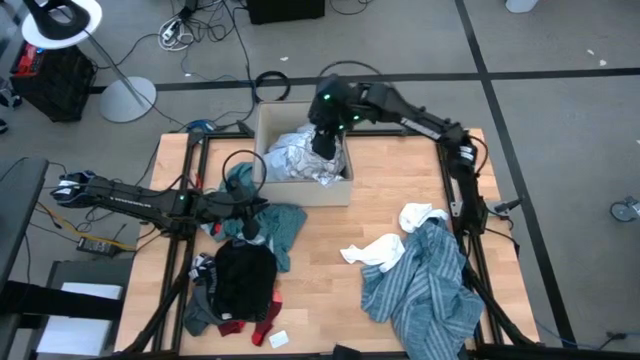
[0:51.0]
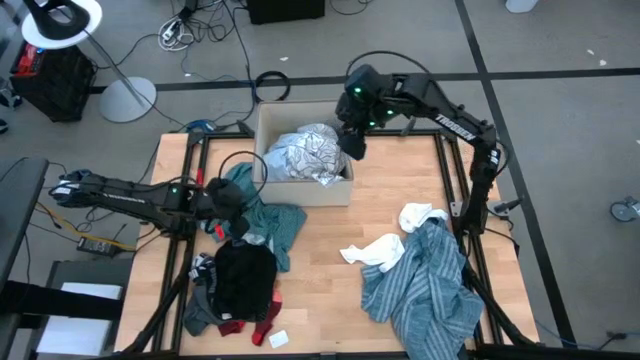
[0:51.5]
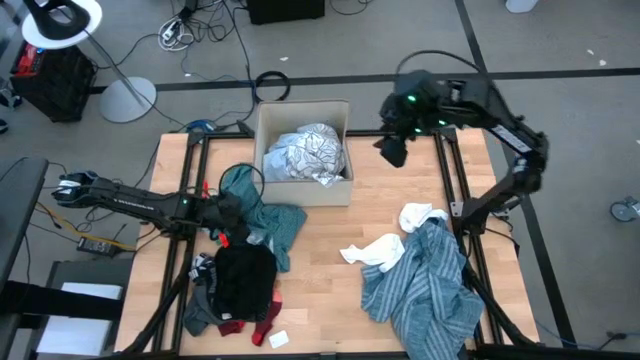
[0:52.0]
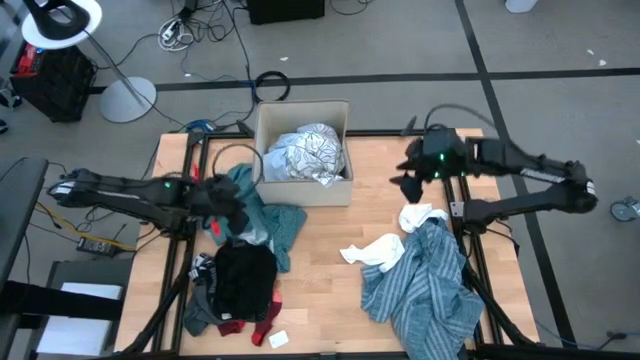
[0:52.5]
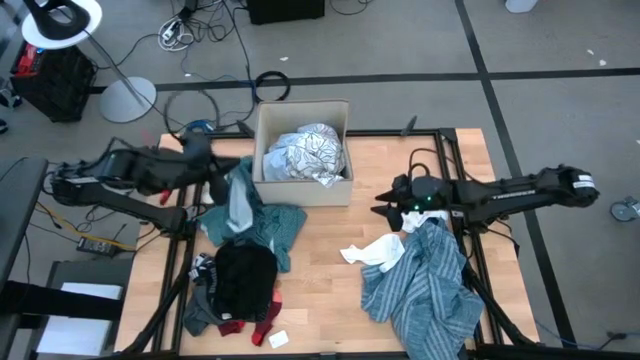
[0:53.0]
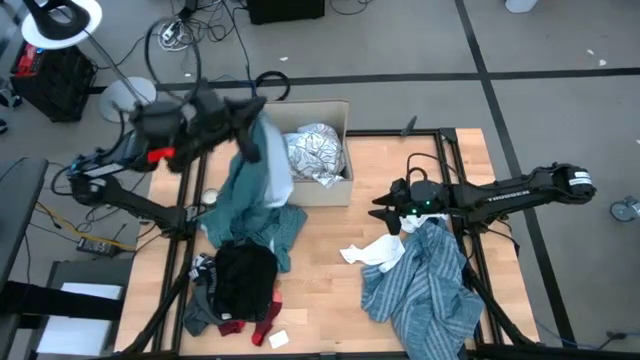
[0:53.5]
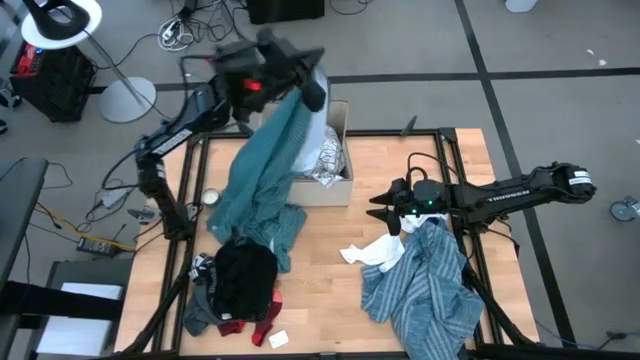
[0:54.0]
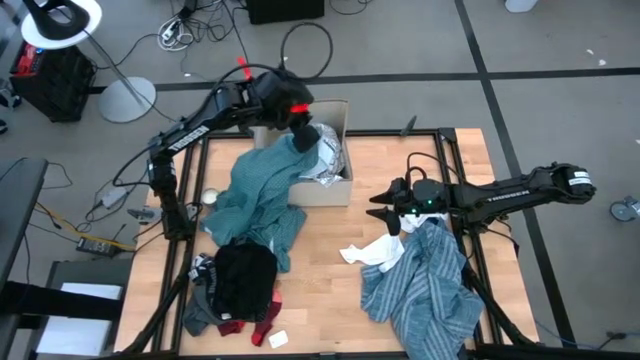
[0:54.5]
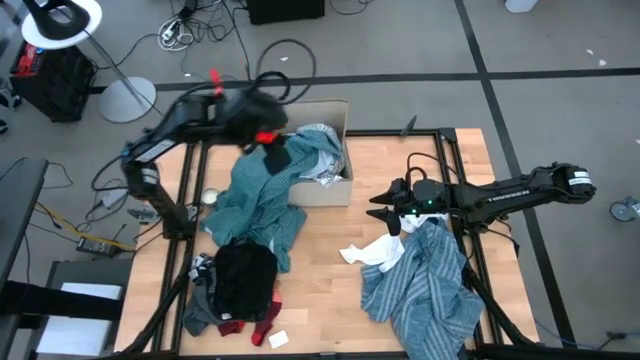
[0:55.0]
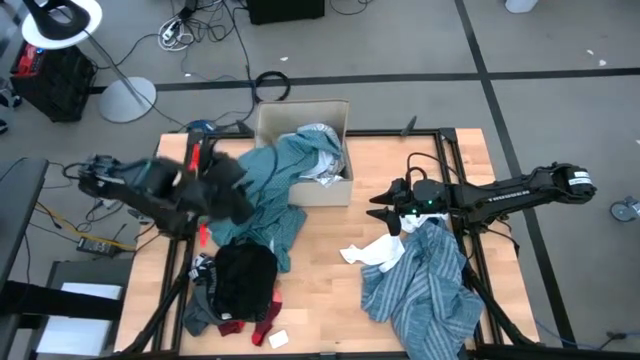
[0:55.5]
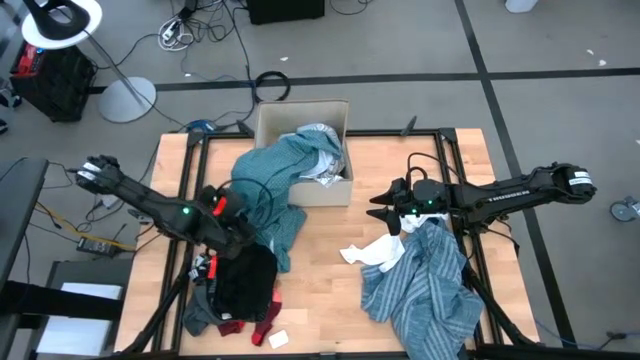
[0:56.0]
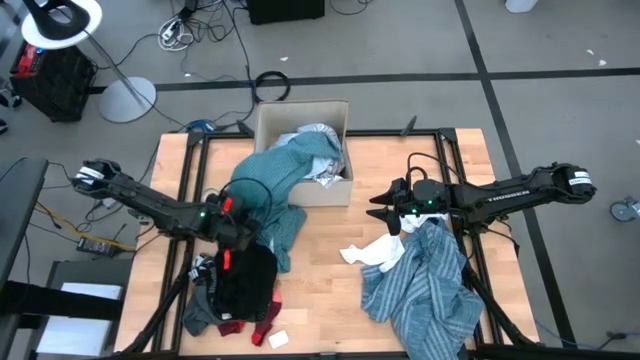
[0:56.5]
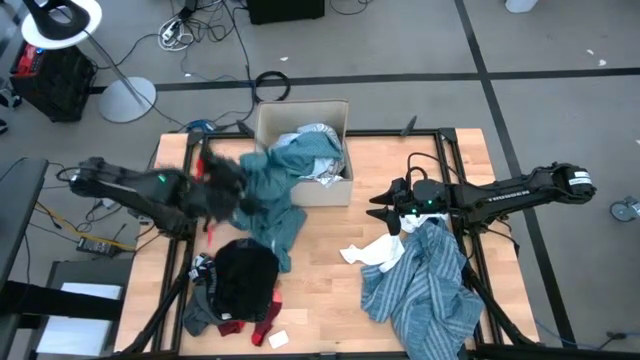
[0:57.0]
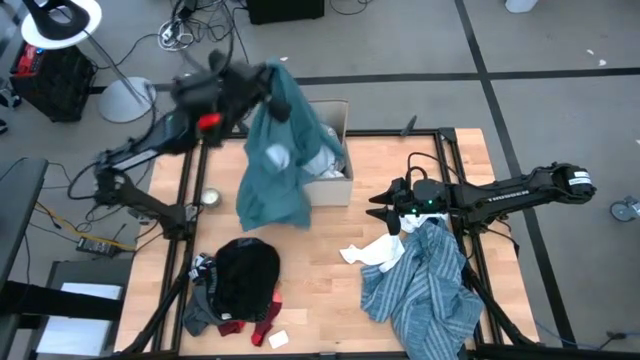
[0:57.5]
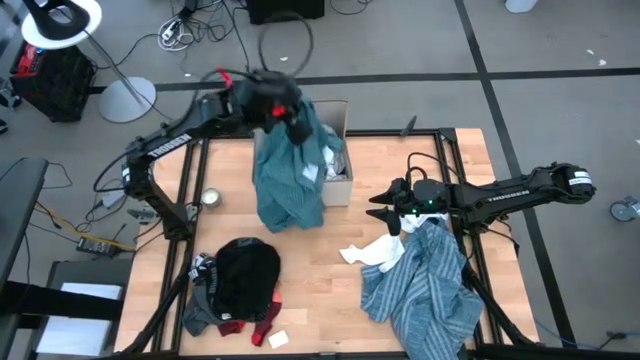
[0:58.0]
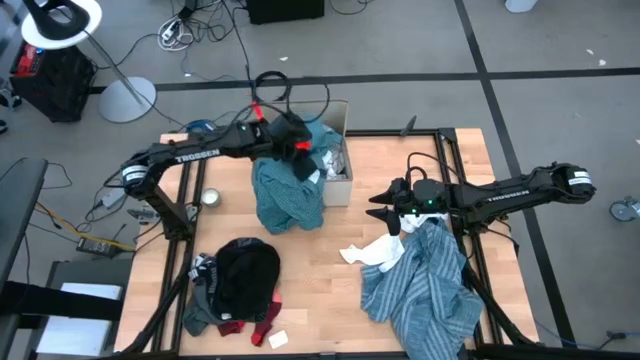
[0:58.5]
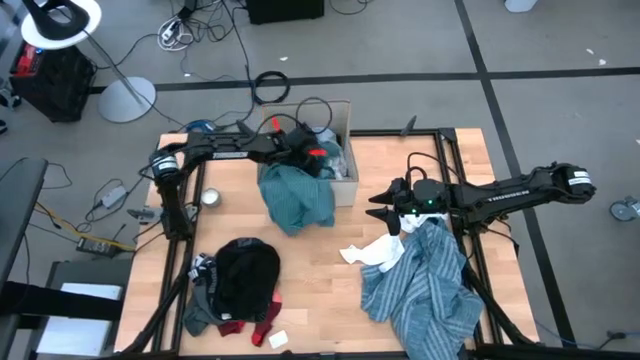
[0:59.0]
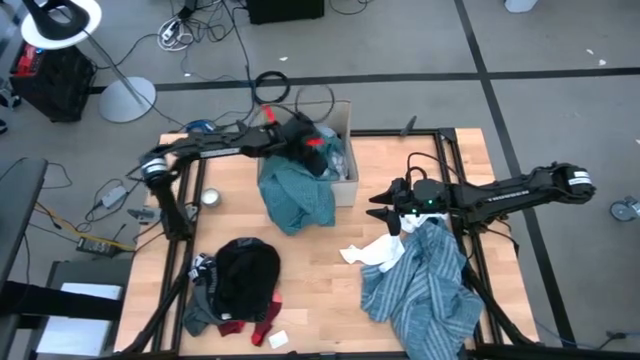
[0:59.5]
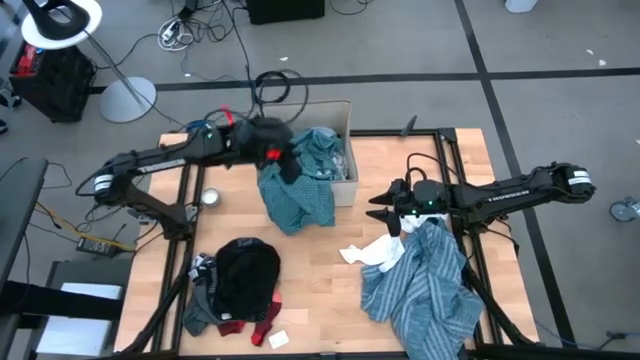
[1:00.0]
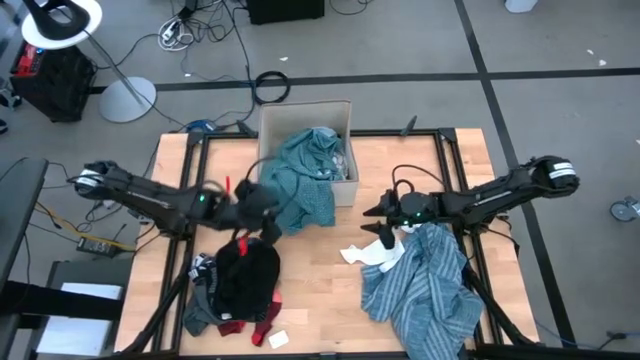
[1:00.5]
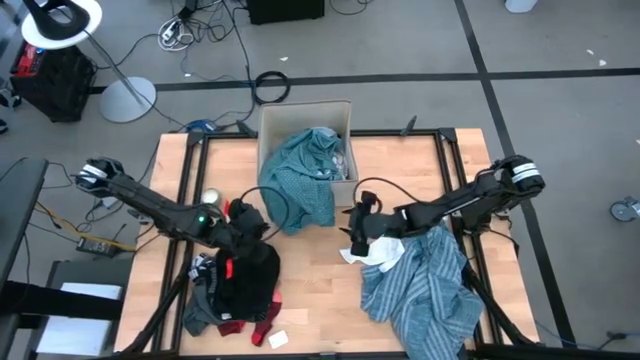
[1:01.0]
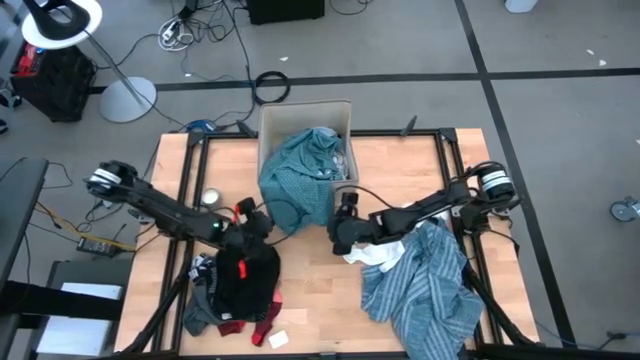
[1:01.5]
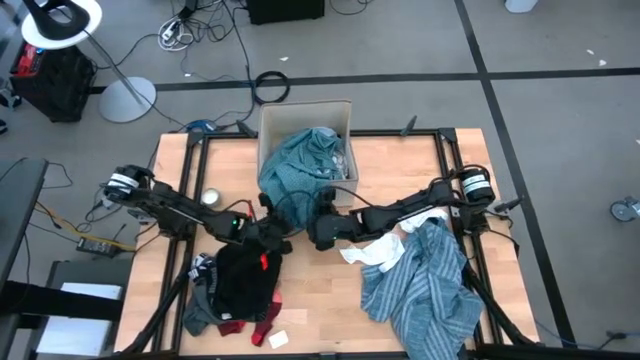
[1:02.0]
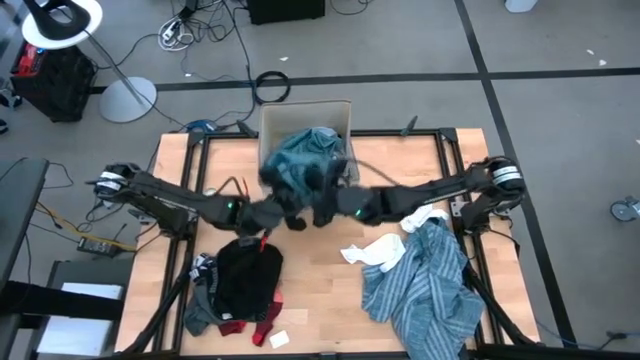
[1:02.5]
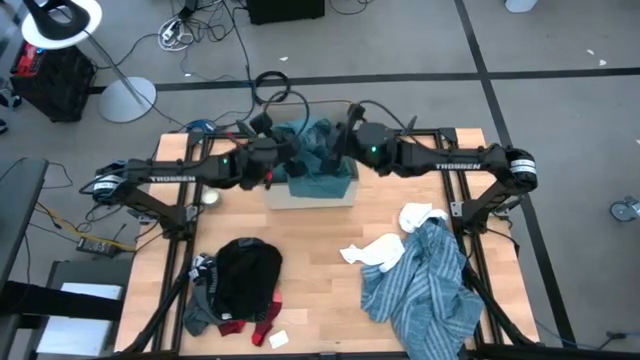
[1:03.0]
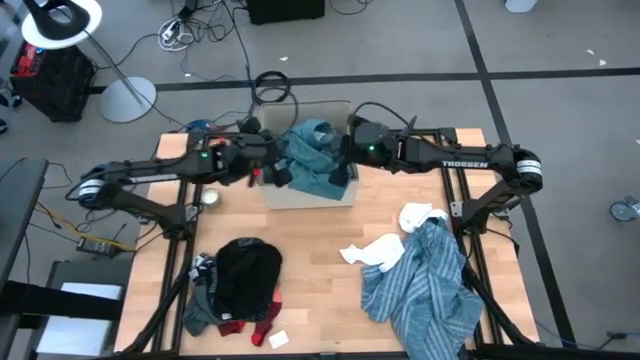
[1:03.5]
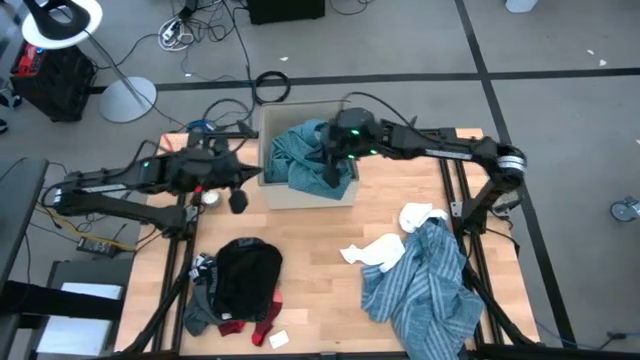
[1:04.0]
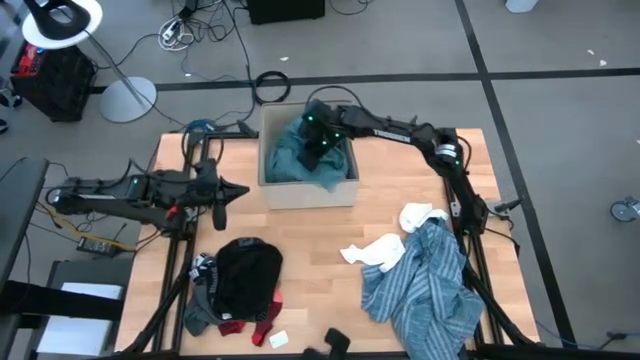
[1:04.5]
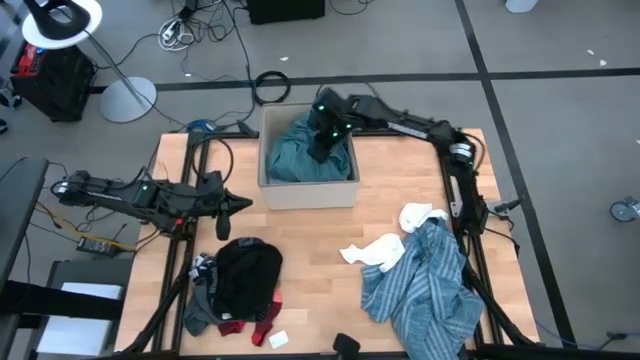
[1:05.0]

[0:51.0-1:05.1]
Task: Sort clothes
Put the green patterned shirt into the laundry organizer

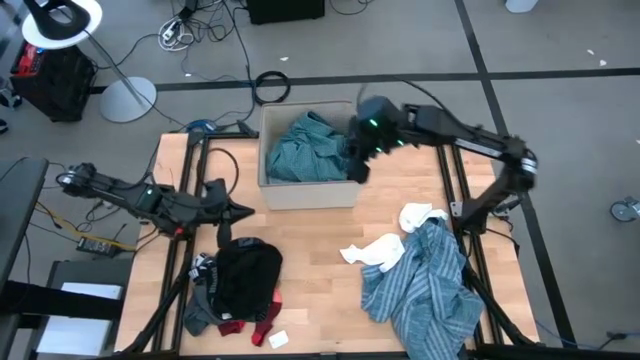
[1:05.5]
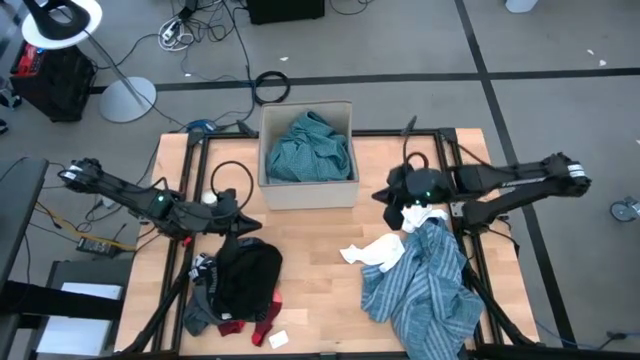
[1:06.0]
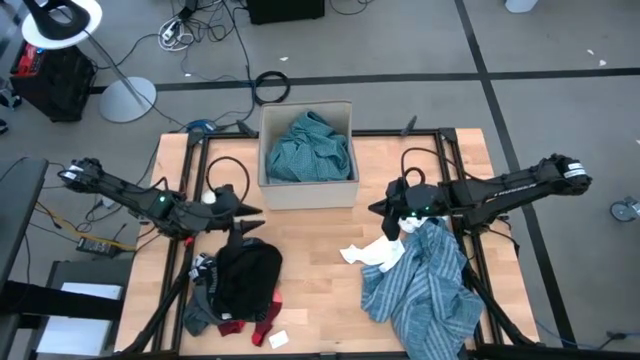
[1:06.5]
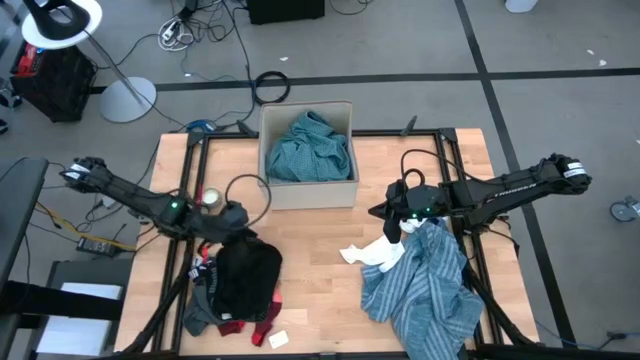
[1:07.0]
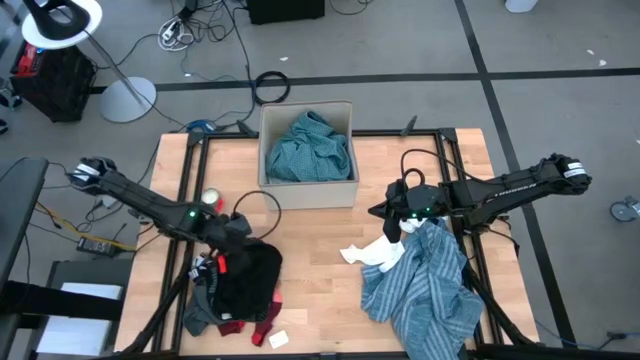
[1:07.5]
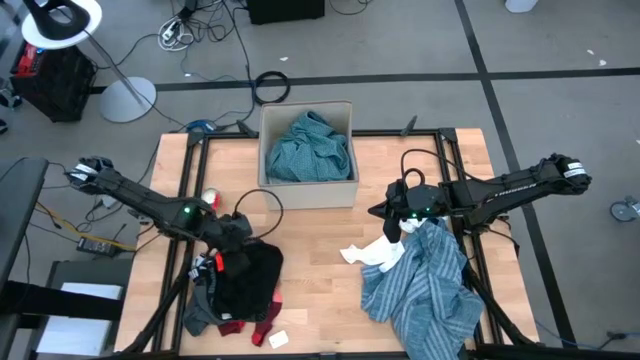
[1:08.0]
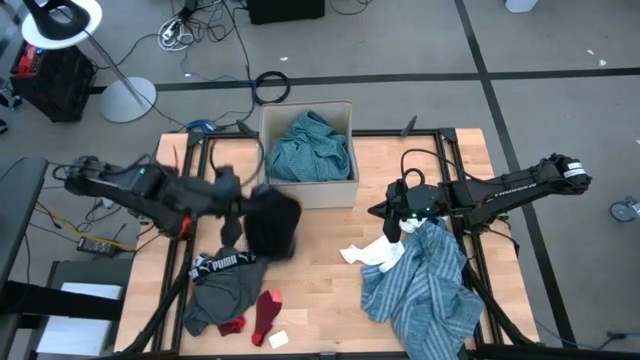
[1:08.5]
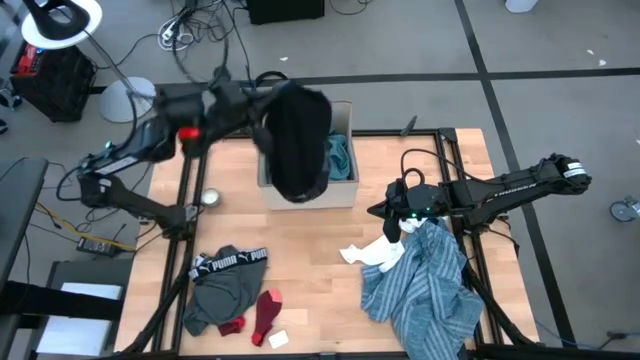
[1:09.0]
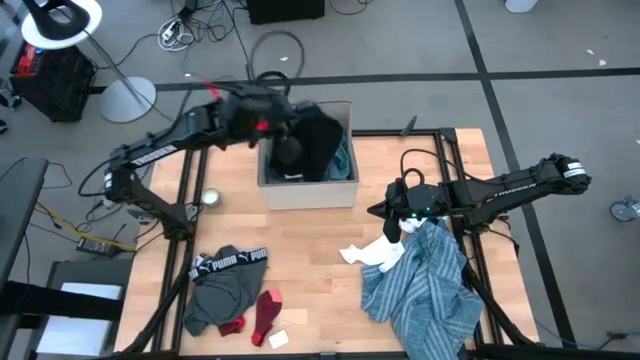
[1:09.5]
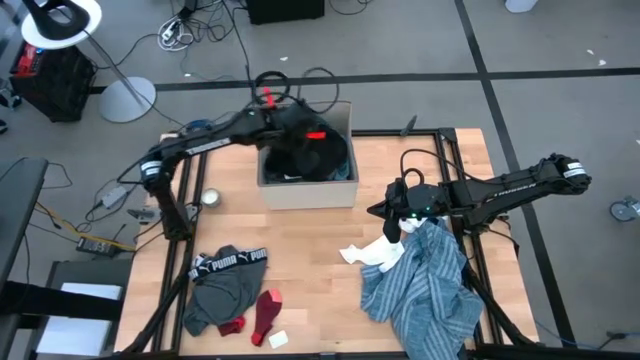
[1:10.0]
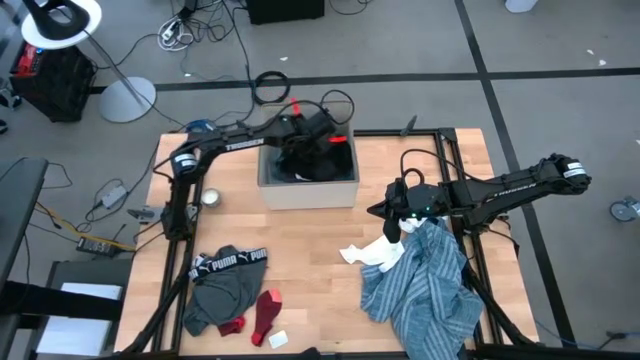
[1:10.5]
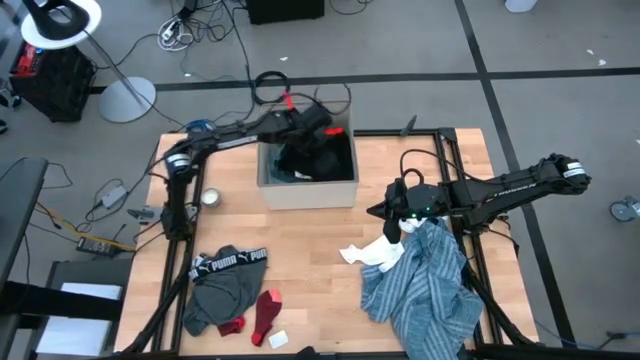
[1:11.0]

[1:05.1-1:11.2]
Put the black underwear into the laundry organizer

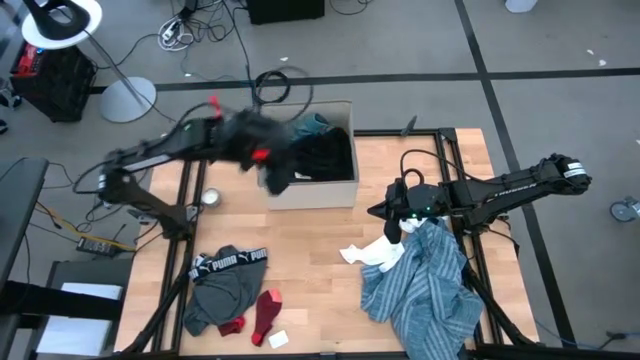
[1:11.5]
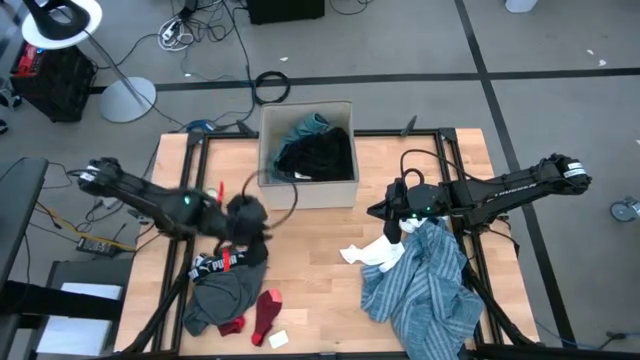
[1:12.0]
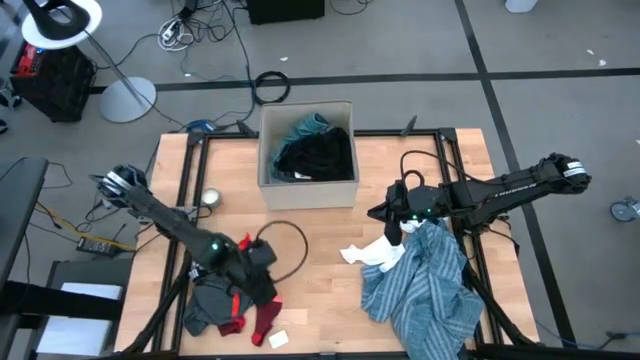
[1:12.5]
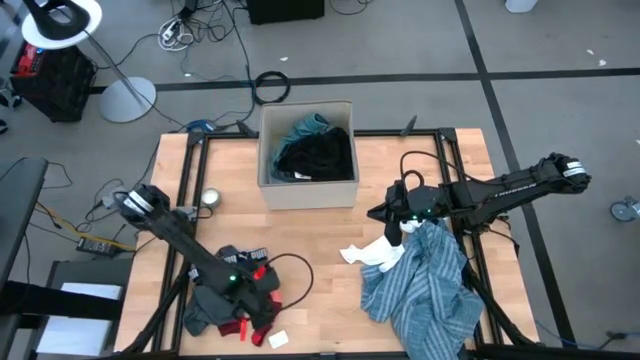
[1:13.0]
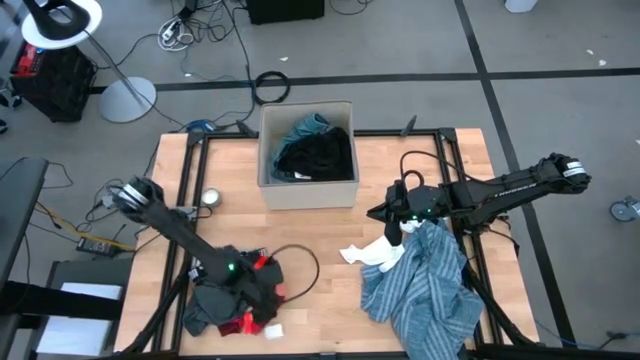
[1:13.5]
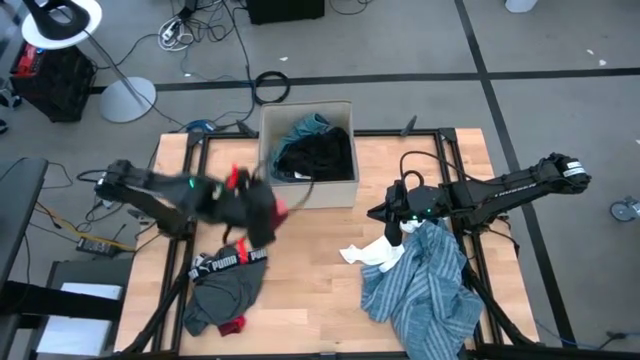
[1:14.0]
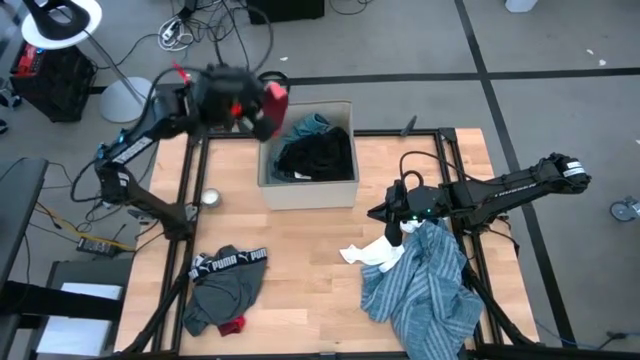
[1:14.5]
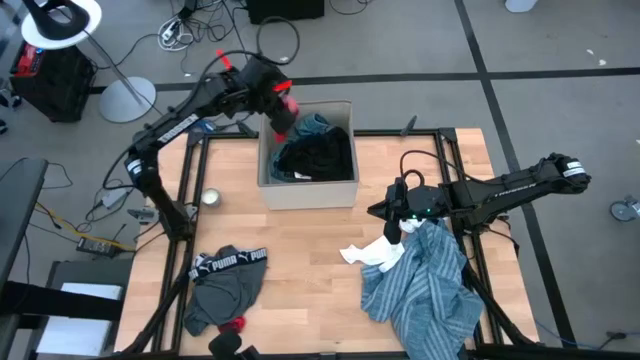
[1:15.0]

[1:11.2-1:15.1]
Put the right red sock into the laundry organizer
